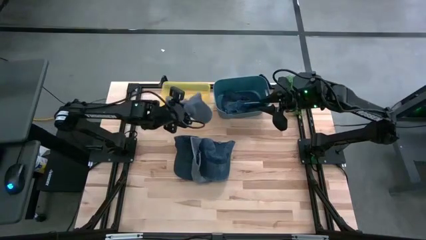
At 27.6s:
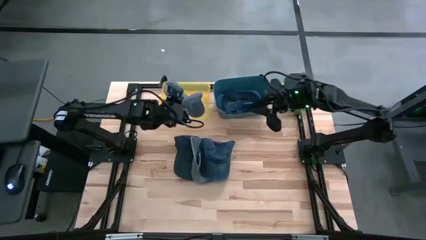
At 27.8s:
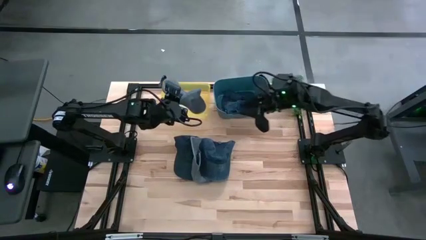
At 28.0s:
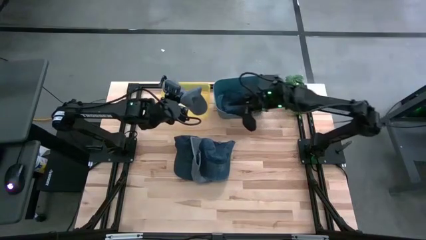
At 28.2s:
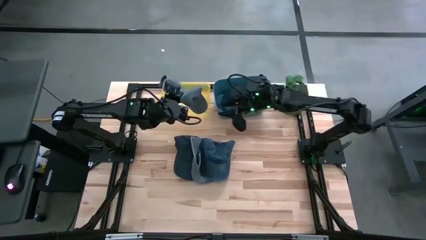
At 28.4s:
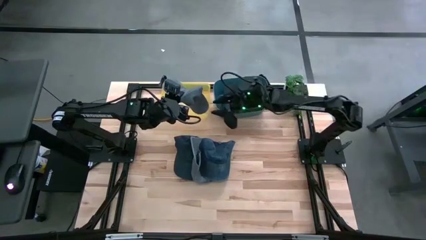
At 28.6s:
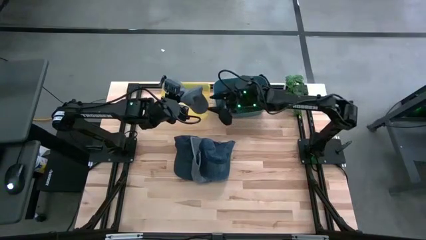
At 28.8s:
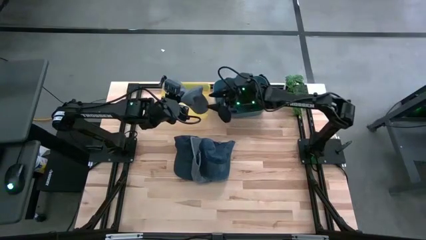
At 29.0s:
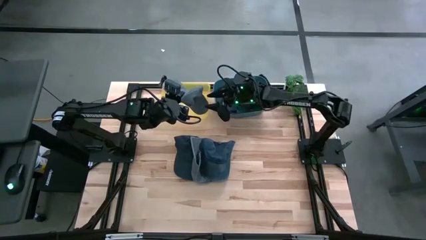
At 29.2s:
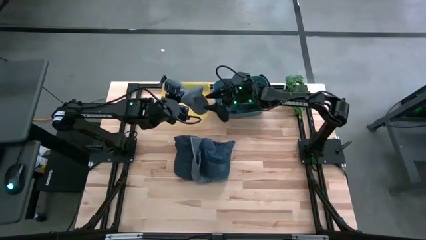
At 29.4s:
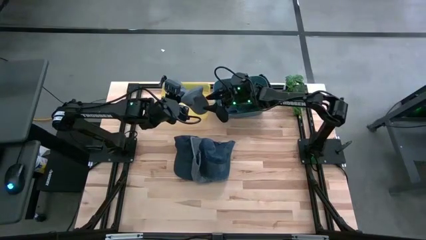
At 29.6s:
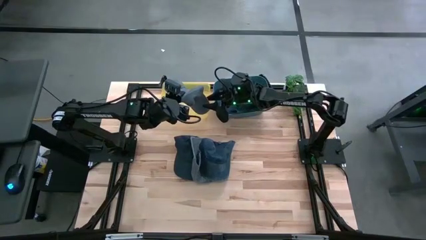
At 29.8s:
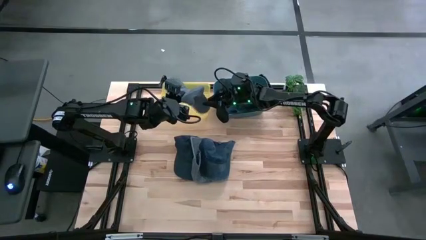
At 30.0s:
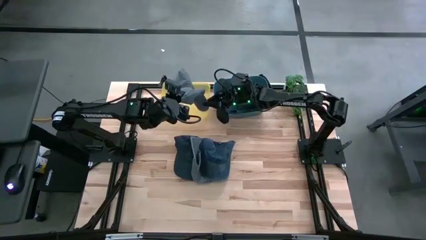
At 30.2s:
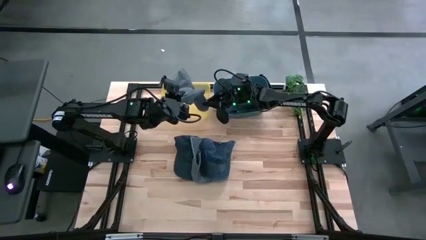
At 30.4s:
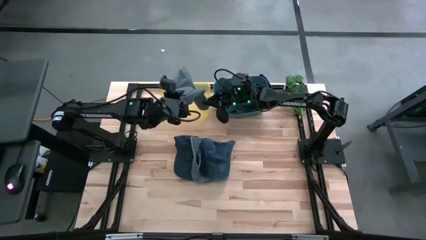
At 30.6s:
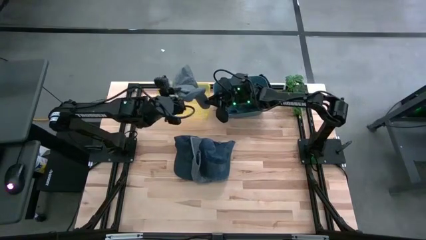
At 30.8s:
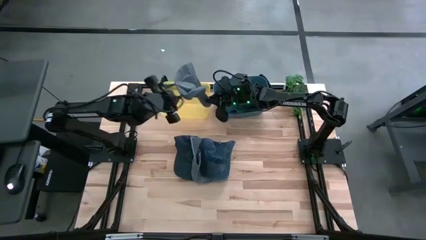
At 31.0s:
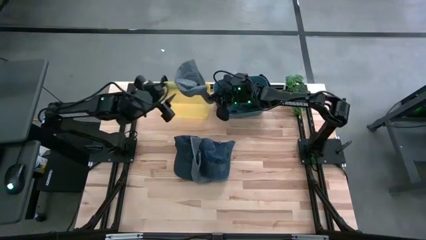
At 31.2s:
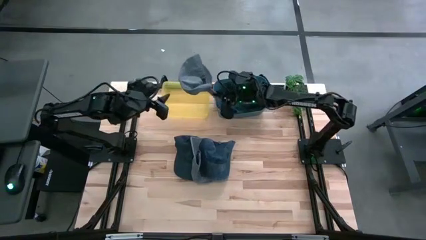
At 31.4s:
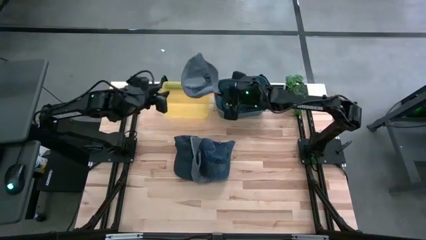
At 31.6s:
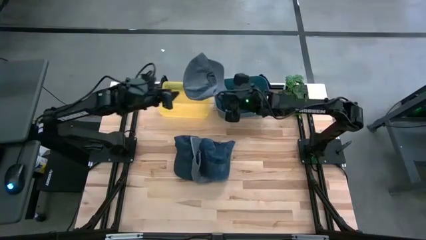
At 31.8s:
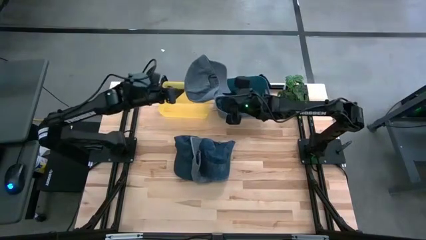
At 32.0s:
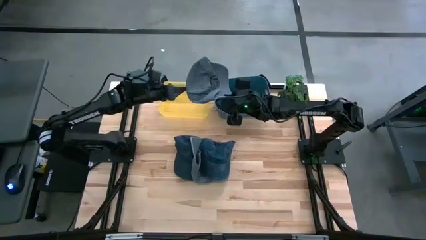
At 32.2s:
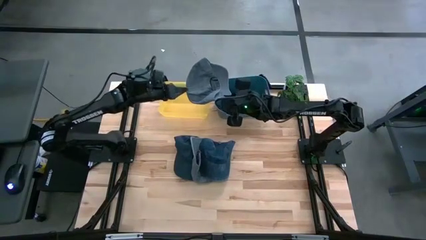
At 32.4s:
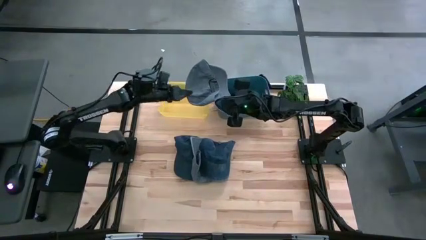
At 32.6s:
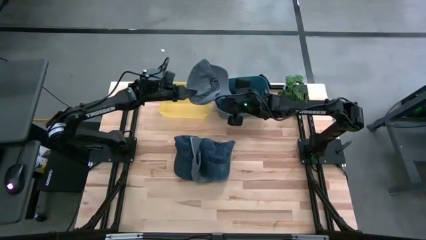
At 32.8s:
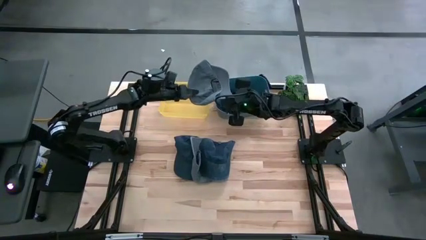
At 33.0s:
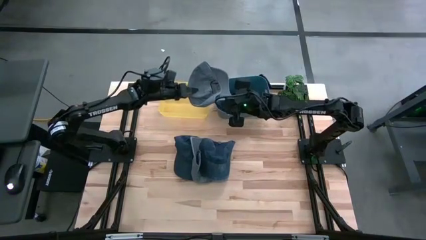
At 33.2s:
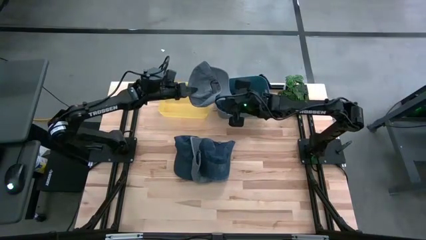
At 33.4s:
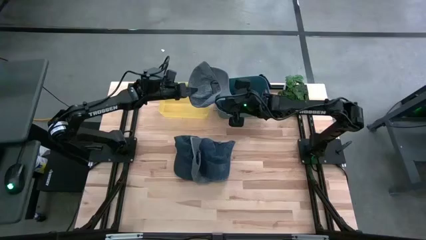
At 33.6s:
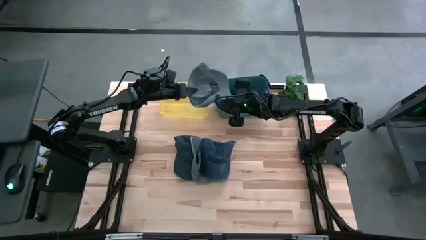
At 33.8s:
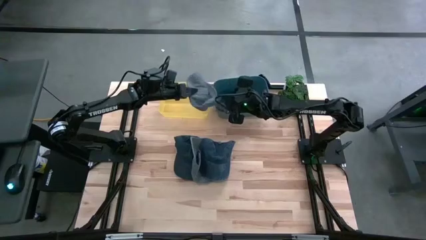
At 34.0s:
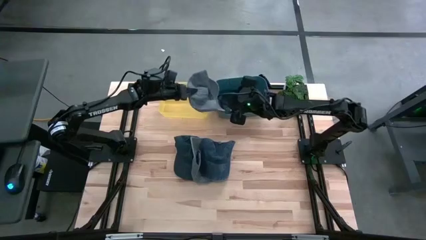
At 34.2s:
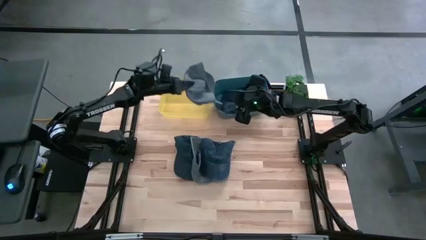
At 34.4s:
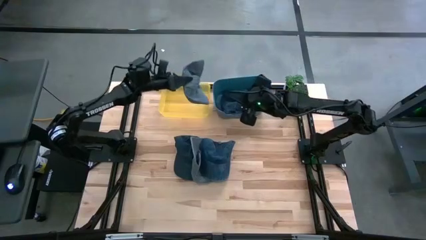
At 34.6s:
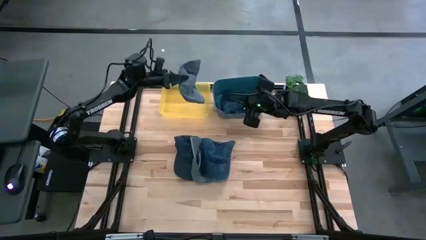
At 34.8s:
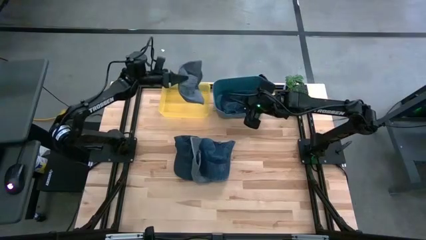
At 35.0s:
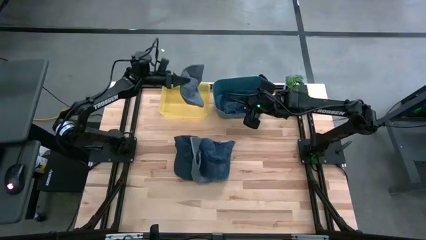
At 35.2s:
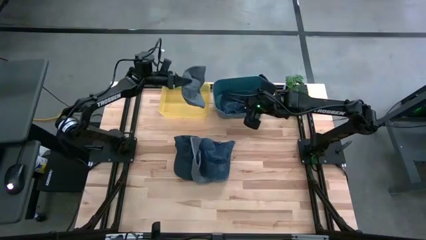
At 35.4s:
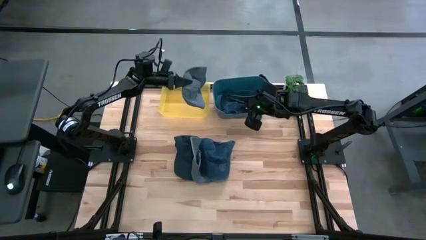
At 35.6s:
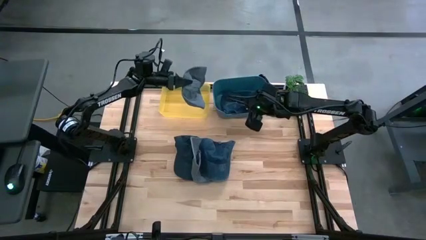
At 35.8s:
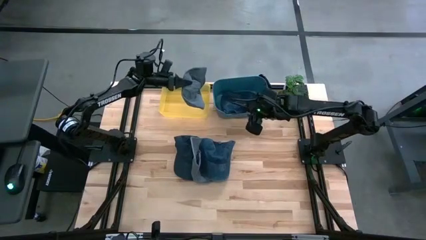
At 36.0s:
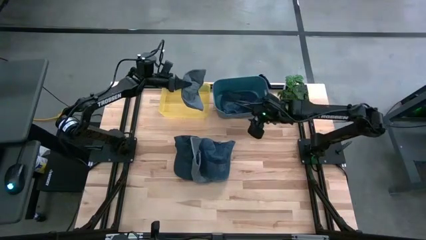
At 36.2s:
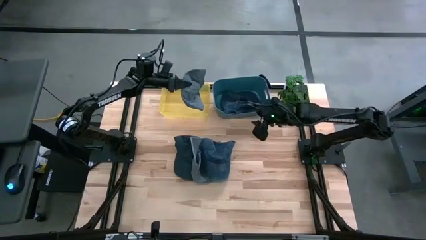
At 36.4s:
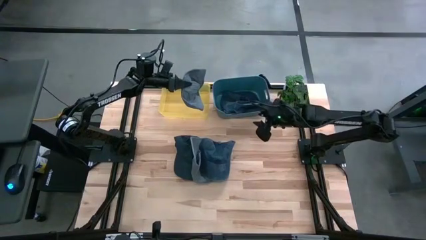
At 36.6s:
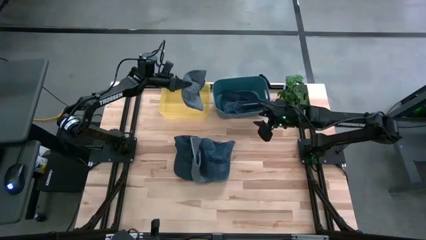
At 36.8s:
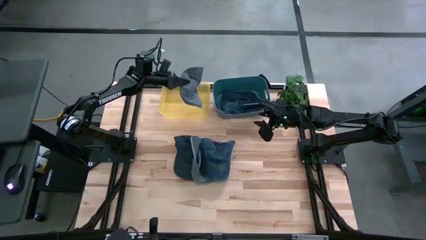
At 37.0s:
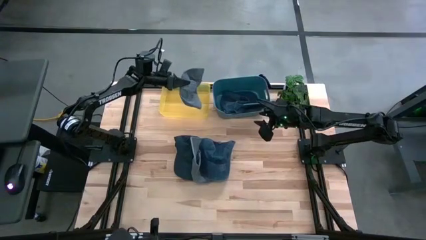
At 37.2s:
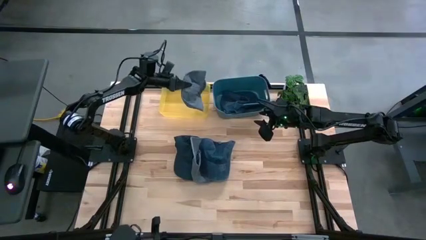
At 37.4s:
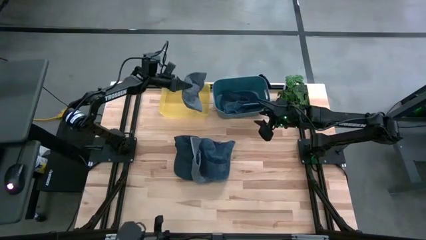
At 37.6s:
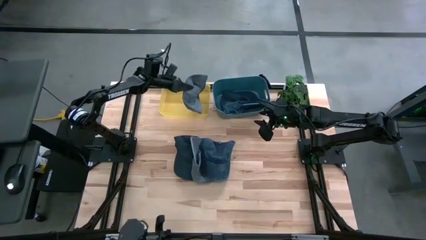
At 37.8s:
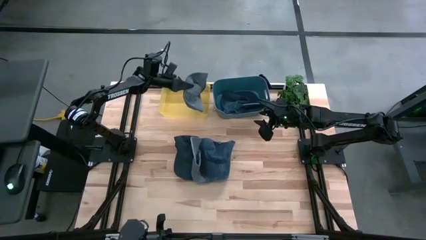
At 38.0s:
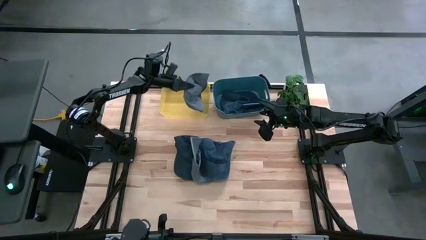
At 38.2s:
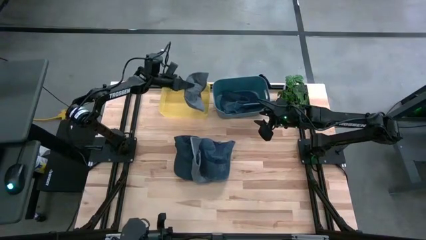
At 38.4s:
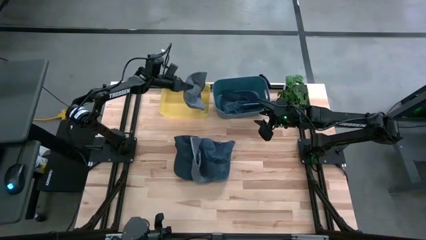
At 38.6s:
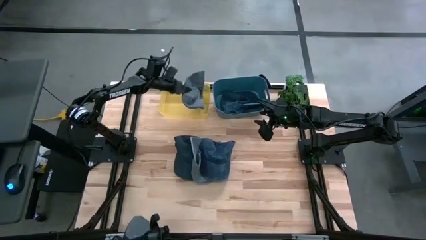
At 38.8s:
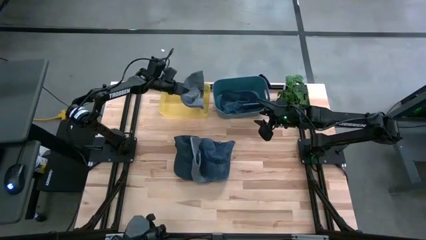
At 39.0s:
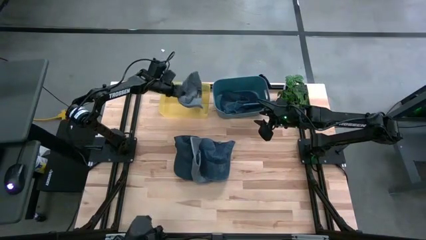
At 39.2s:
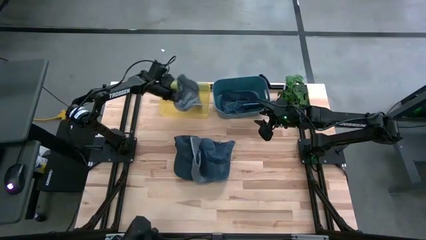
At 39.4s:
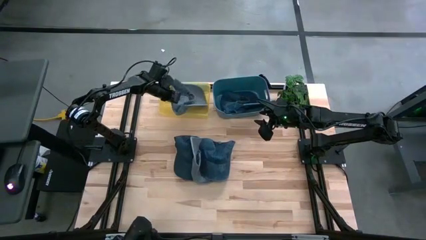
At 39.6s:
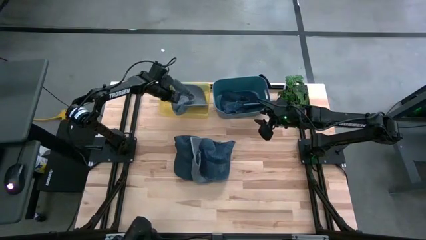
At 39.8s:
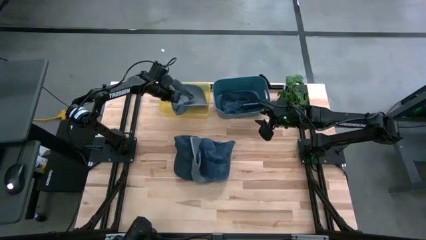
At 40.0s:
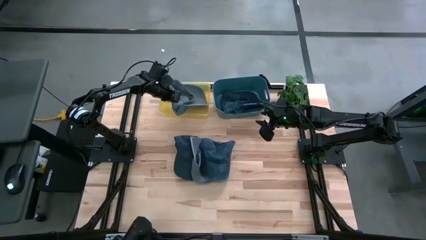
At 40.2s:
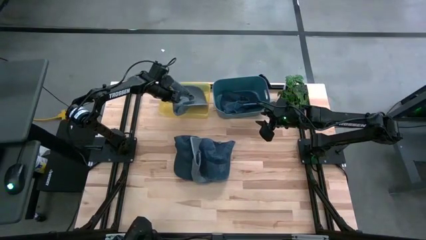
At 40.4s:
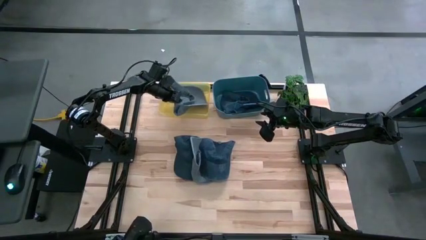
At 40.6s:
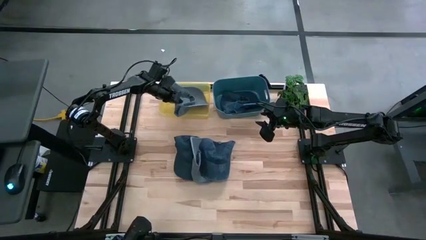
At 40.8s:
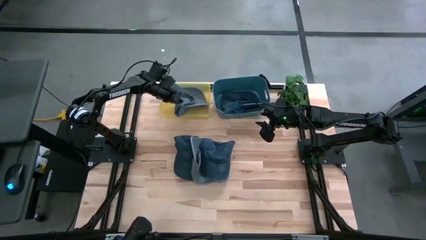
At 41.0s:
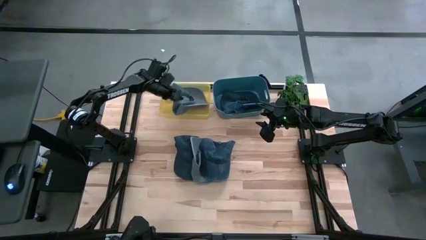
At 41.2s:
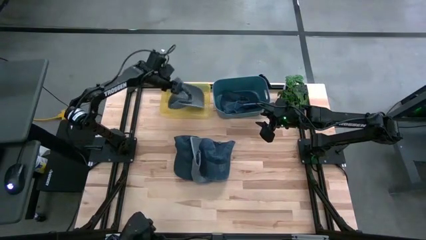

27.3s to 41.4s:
Task: Pick & Place hat
Put the right gray cap into the yellow bin

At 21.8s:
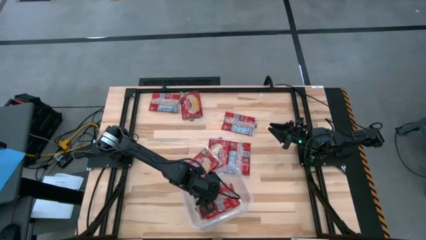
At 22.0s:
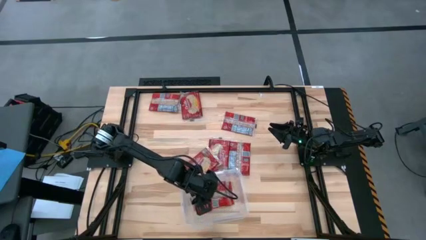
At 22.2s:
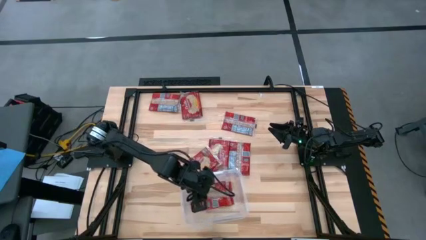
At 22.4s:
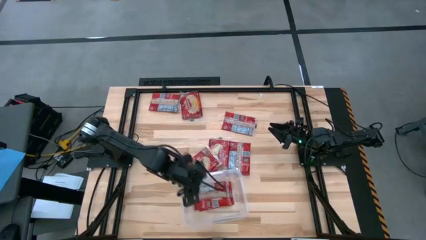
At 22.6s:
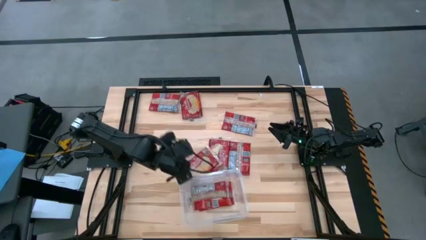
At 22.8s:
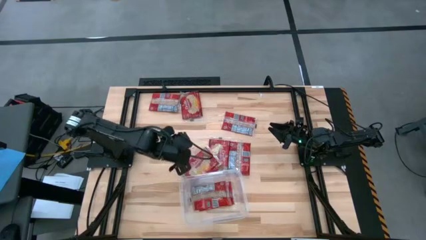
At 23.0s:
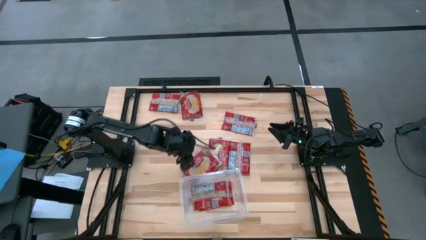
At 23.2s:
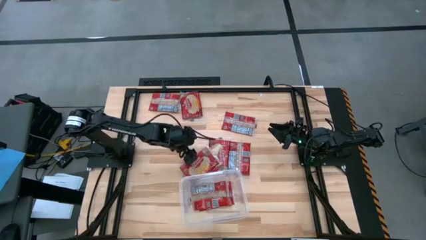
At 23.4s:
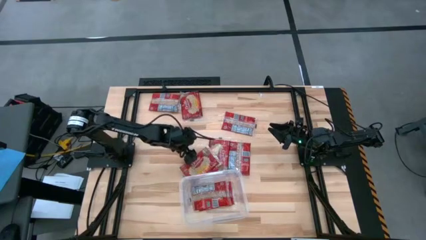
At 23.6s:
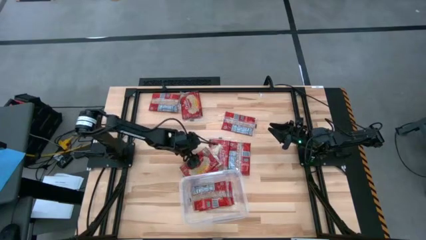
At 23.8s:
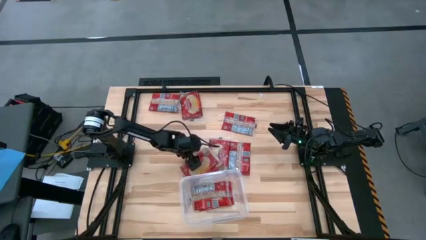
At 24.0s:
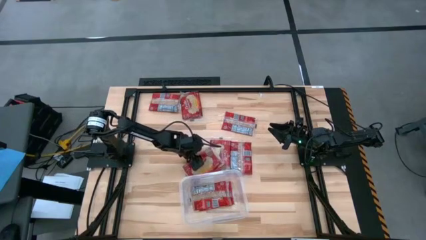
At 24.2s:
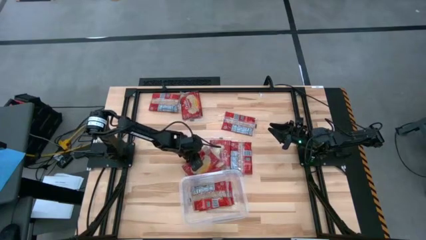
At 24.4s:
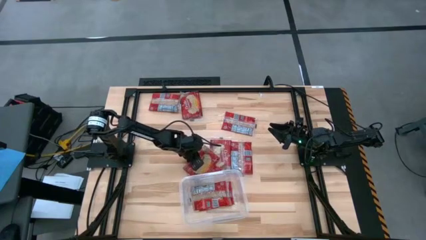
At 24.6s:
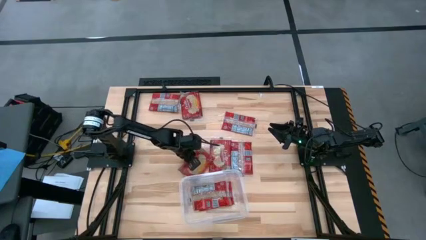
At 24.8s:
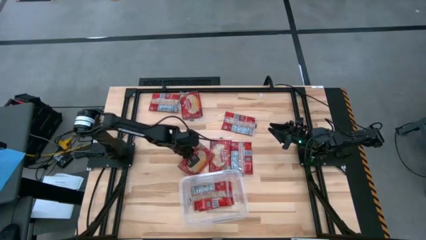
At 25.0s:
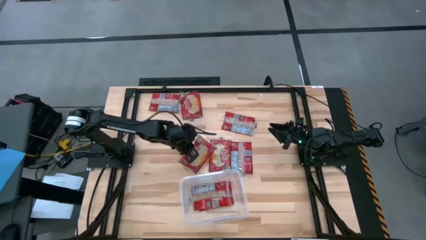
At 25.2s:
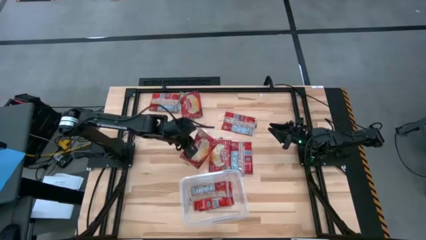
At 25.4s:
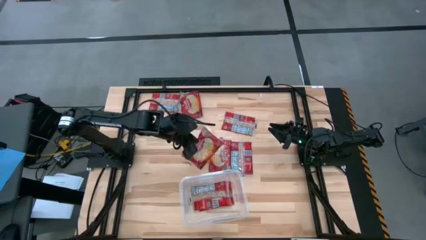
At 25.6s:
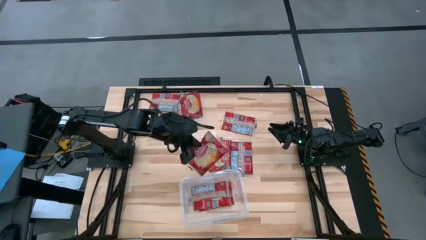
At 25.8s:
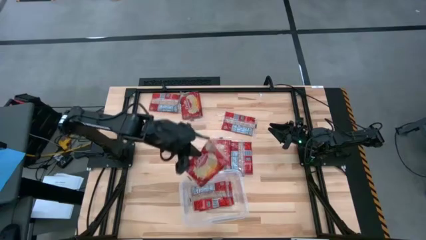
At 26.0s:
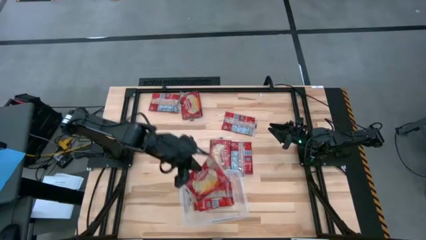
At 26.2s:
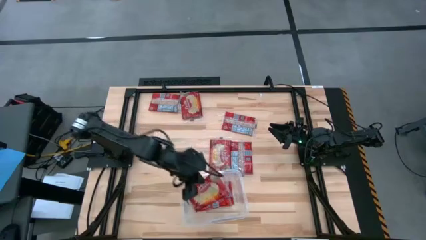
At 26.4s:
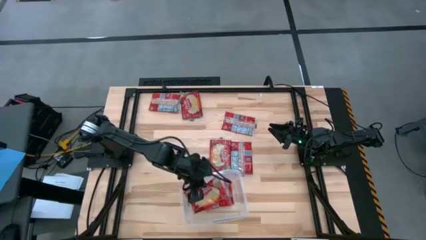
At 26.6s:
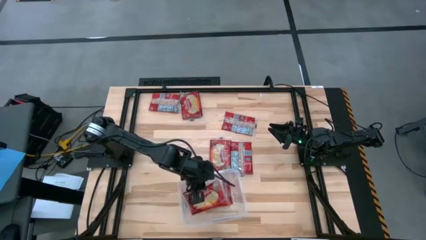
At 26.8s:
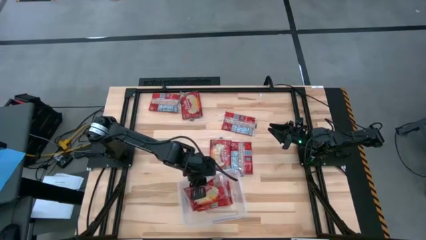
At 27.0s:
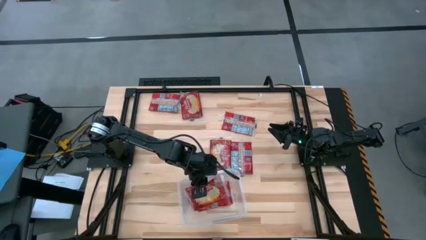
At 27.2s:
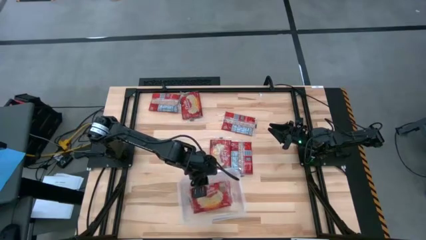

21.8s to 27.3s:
Task: Sort popcorn bags into baskets
Put the red popcorn bag into the transparent container
